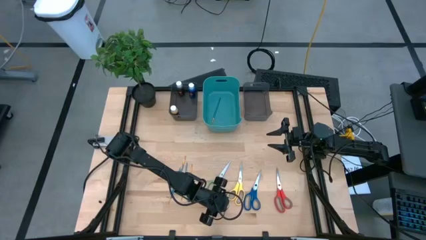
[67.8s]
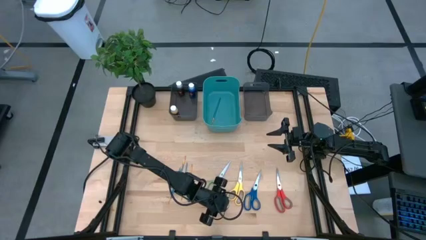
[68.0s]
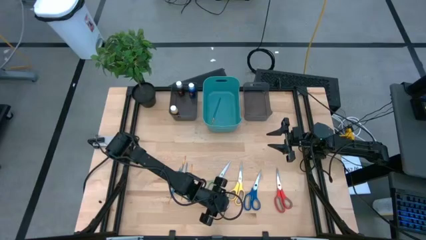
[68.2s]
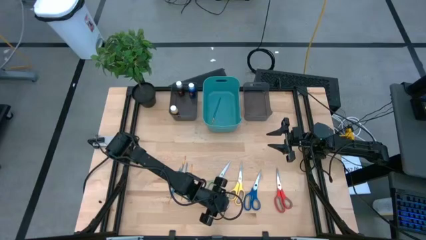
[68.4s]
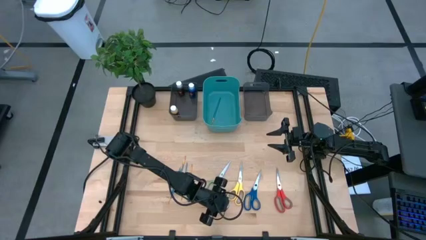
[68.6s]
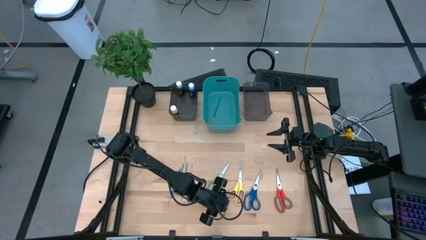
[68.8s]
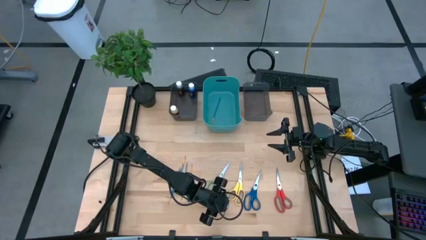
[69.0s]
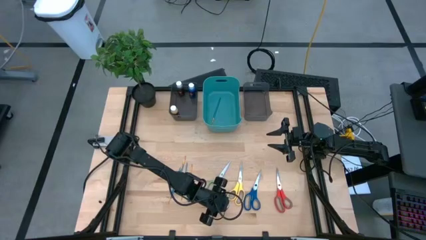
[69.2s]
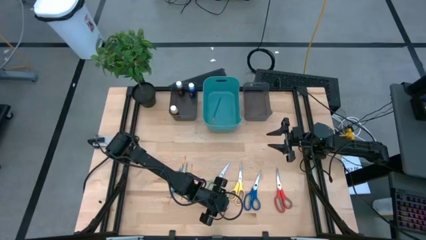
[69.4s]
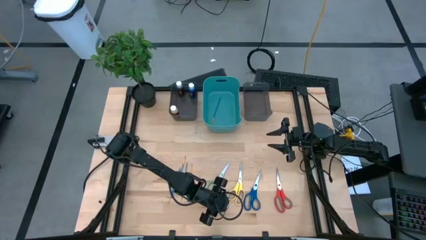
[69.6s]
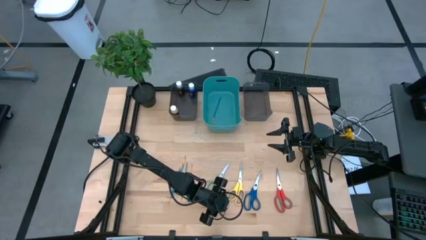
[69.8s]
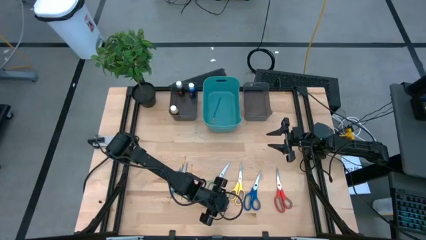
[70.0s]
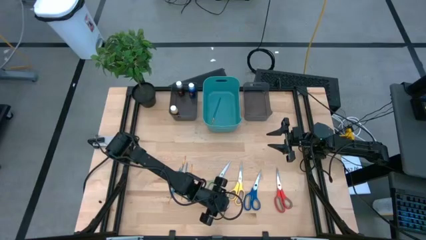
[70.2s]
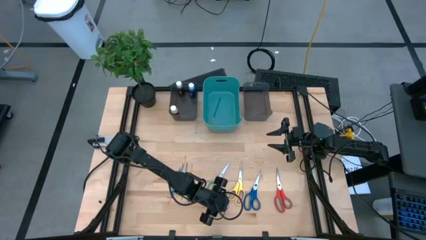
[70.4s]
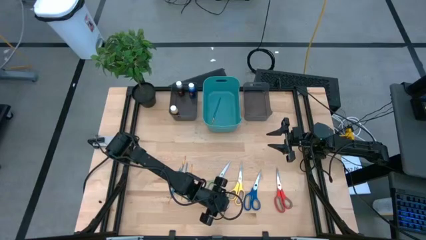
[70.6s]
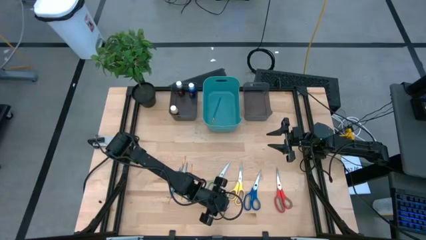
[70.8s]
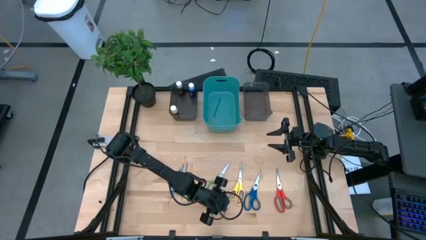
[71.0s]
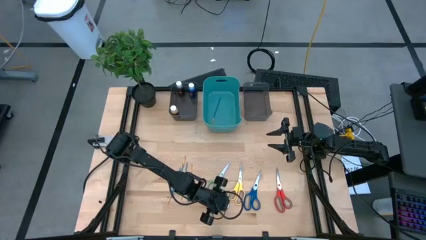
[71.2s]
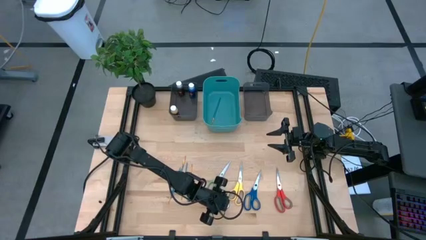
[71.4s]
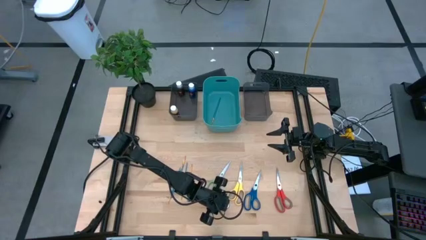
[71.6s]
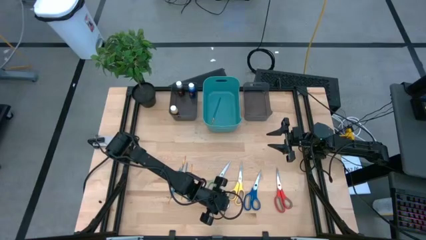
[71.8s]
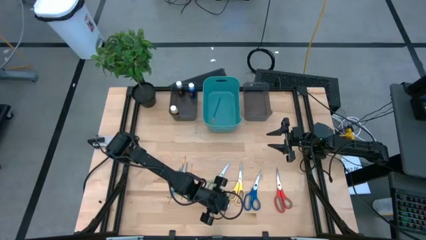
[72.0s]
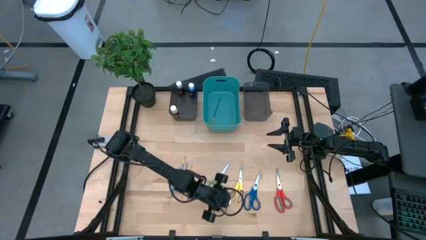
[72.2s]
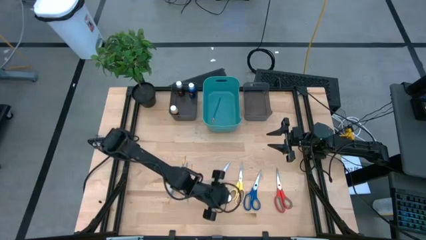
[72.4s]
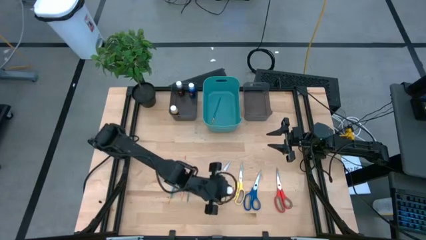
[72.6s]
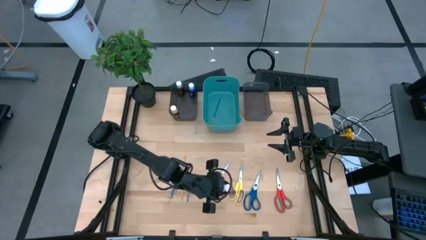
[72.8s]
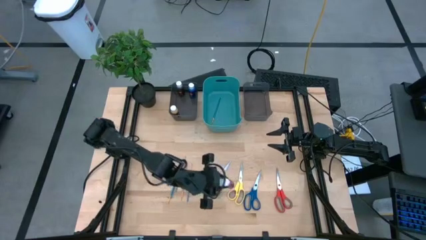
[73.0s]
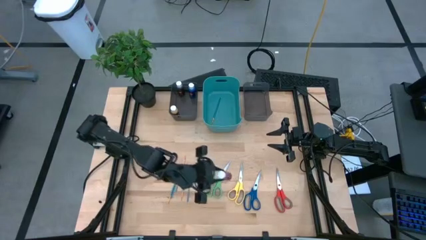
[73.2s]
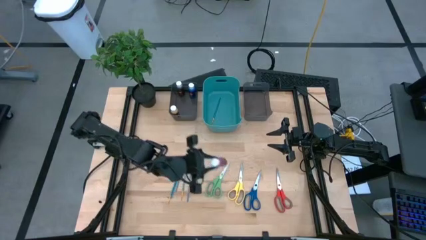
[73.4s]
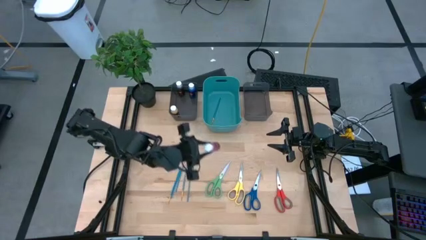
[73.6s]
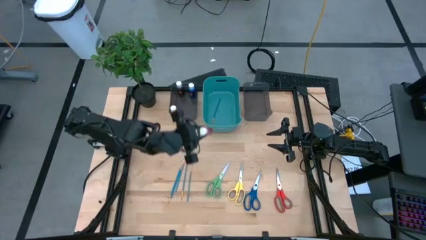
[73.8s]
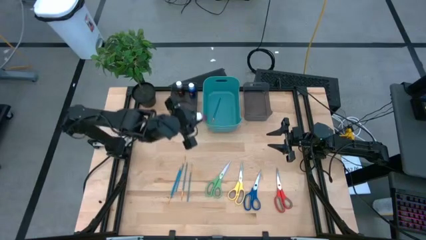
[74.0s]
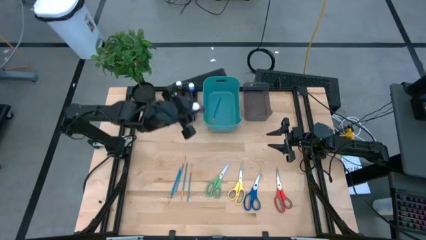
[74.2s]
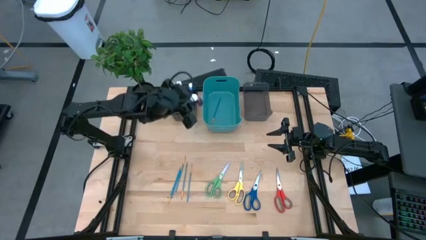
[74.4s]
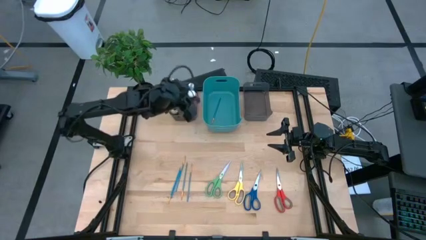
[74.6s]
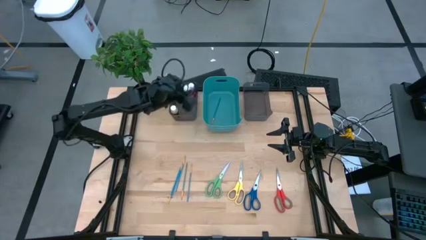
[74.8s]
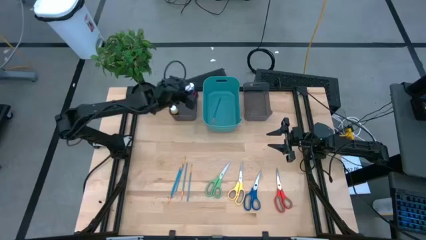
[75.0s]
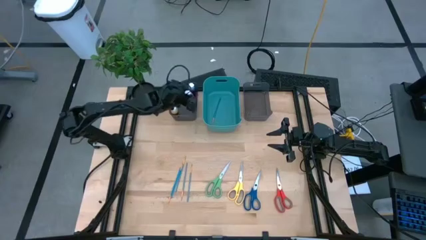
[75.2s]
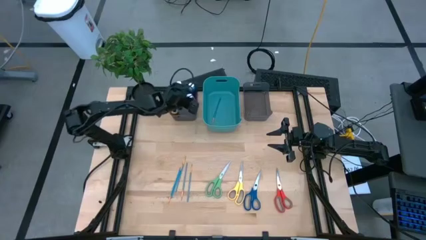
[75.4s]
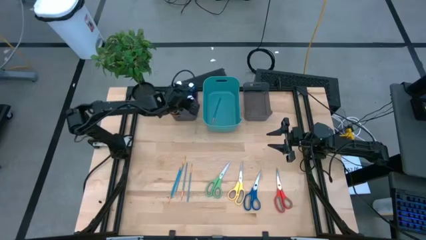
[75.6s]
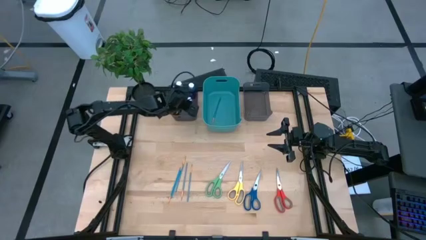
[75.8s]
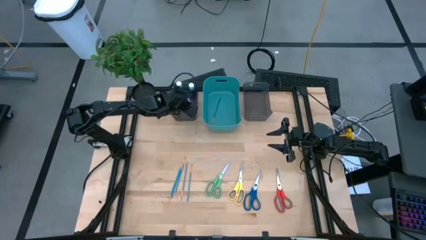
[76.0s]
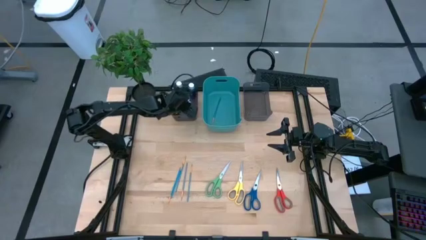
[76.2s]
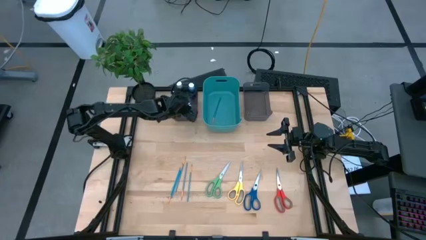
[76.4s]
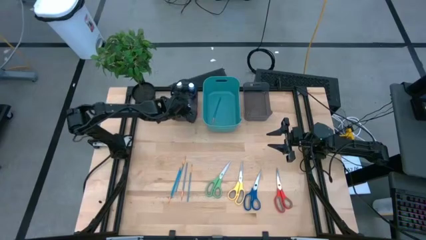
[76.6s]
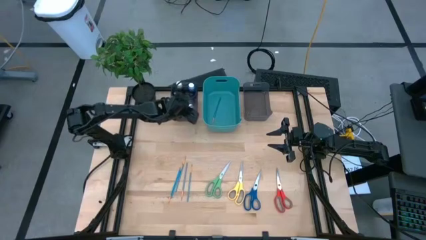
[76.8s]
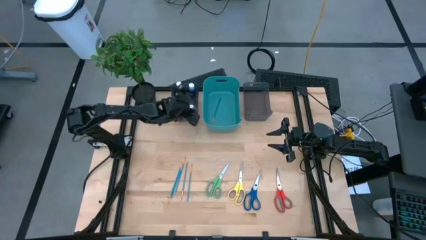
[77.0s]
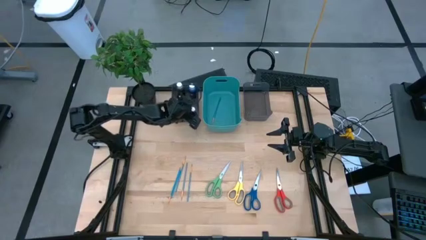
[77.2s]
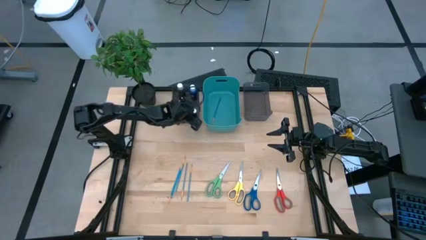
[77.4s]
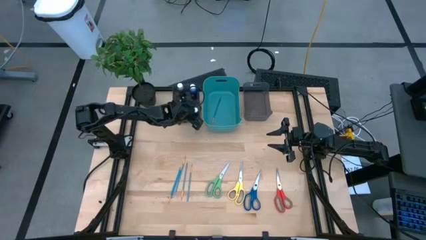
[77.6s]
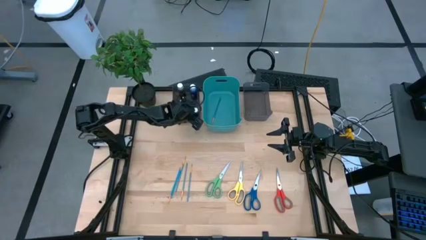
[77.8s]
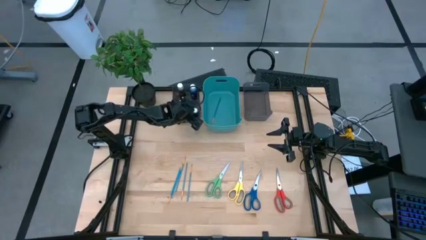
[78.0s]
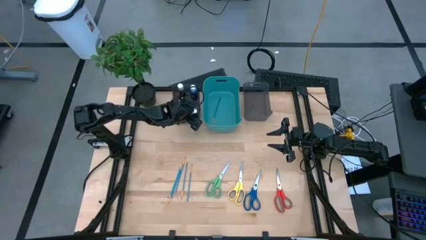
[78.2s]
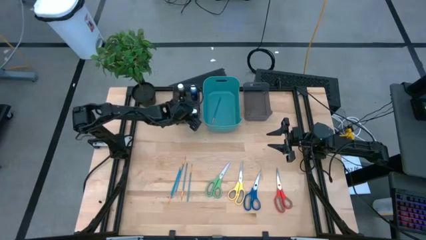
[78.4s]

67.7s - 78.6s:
Task: Pick & Place Paint Supplies
Put the pink paint bottle into the left black bin

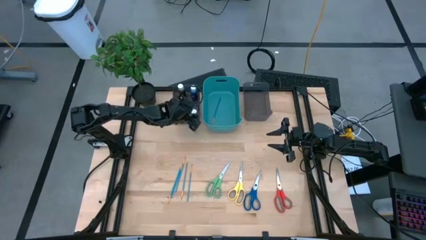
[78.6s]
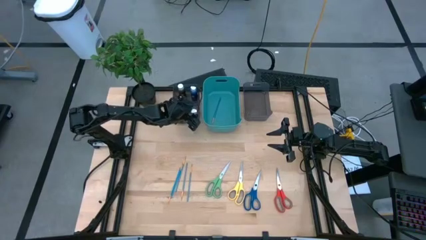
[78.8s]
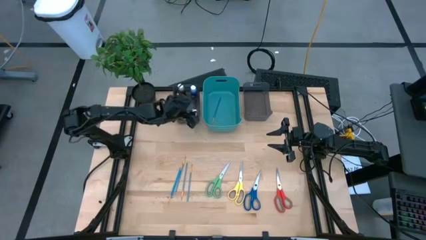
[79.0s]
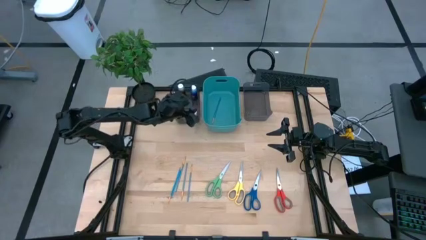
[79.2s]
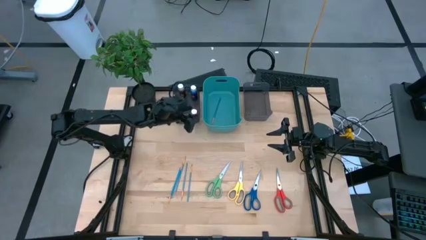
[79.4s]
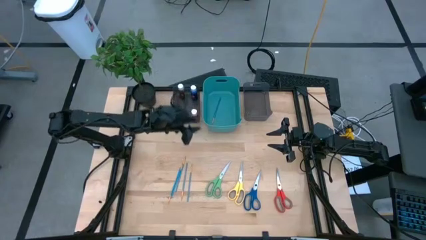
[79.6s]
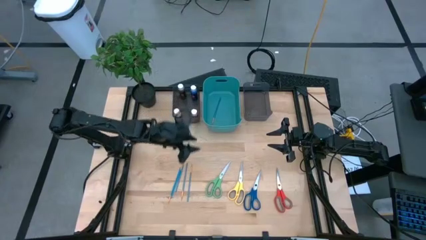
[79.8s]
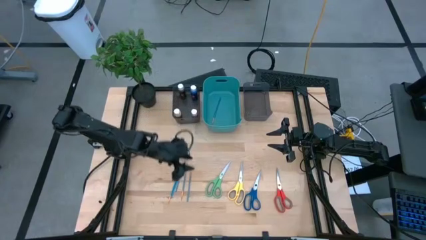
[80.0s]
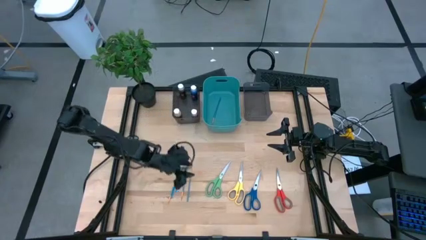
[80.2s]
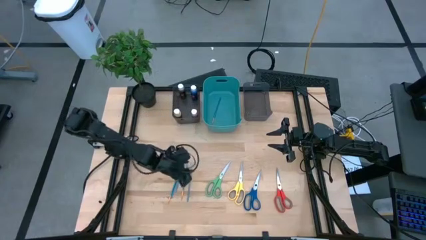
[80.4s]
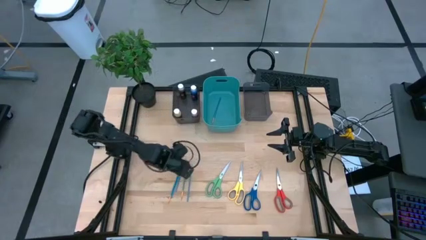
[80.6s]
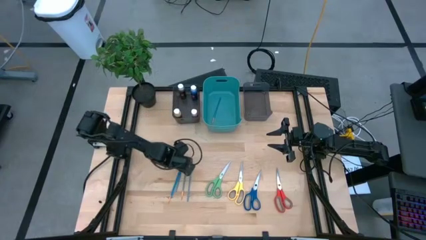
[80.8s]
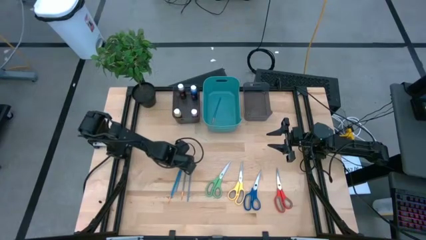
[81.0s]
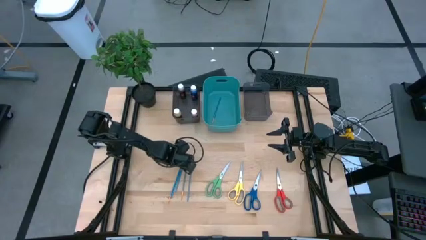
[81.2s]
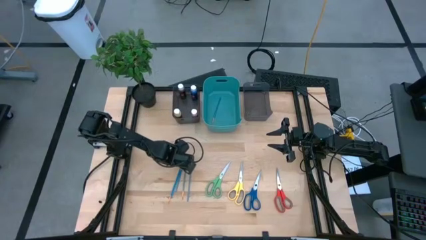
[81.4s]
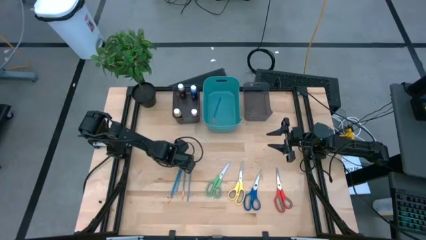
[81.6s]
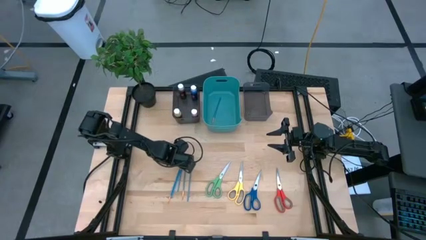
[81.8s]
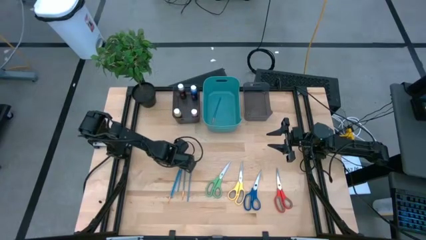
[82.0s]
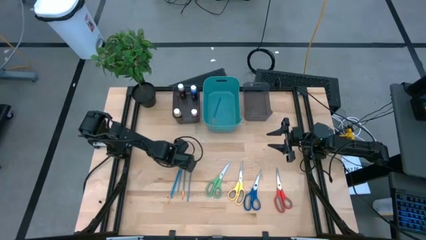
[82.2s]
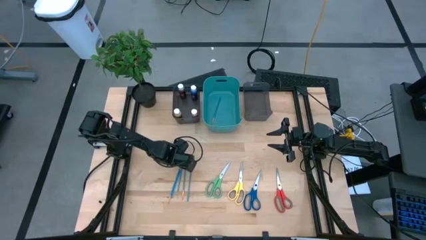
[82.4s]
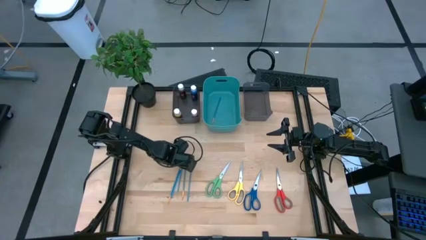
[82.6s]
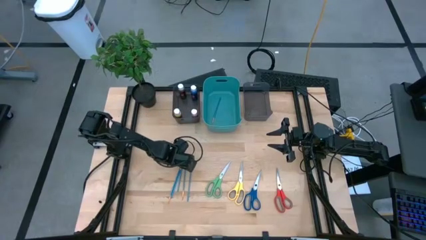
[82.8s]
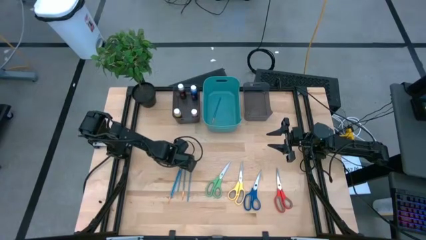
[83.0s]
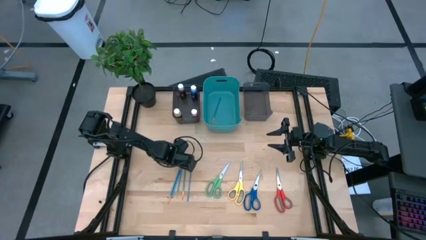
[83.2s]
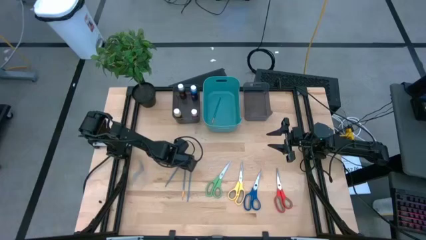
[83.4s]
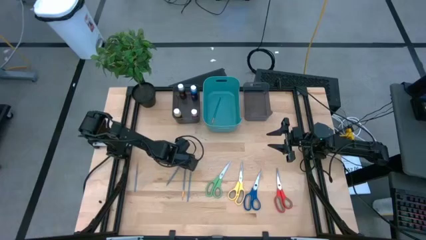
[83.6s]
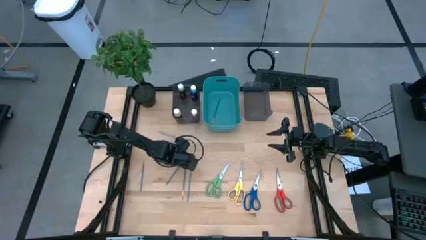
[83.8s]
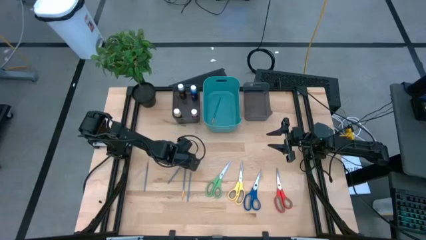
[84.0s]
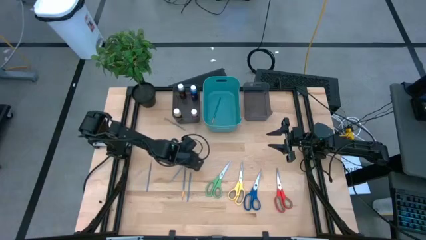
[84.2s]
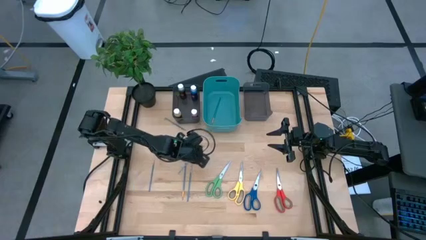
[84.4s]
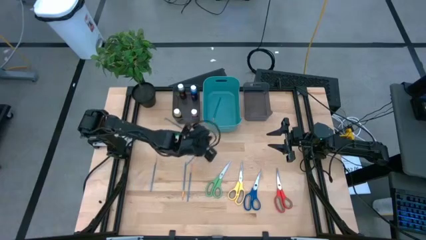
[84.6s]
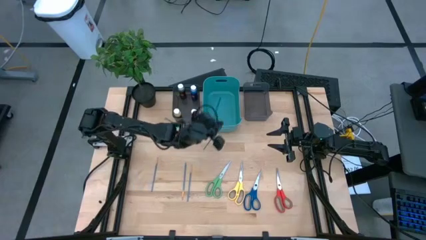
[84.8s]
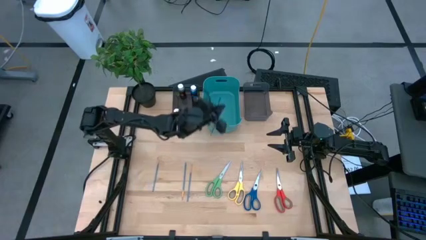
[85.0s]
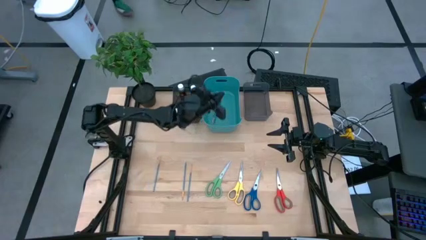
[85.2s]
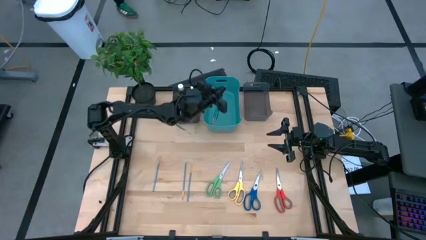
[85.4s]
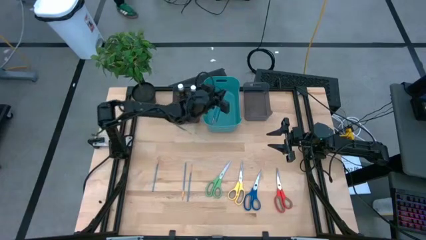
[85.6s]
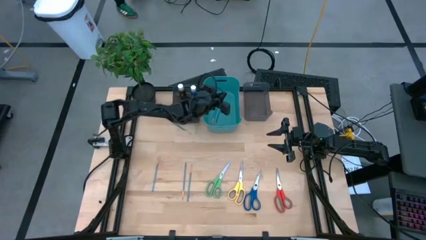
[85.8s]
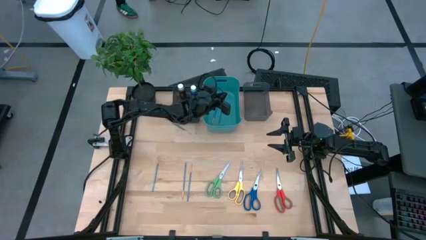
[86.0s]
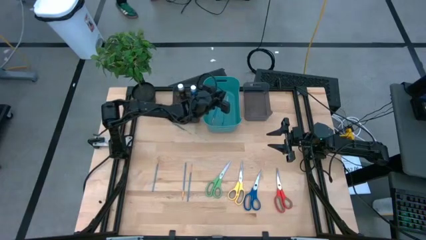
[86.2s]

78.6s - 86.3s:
Put the blue paint brush into the blue bin
